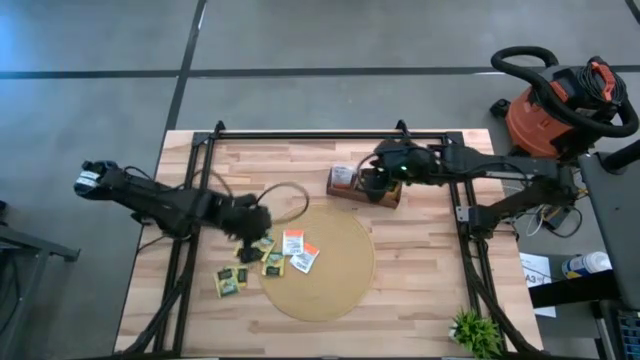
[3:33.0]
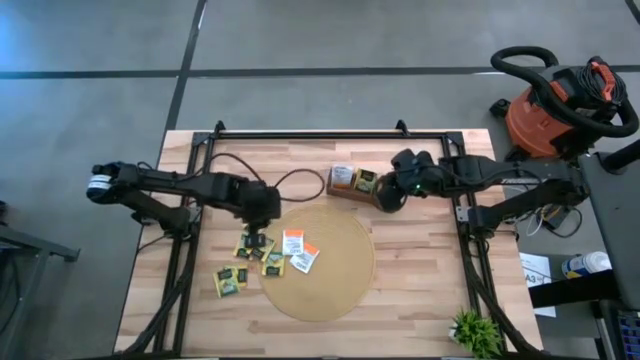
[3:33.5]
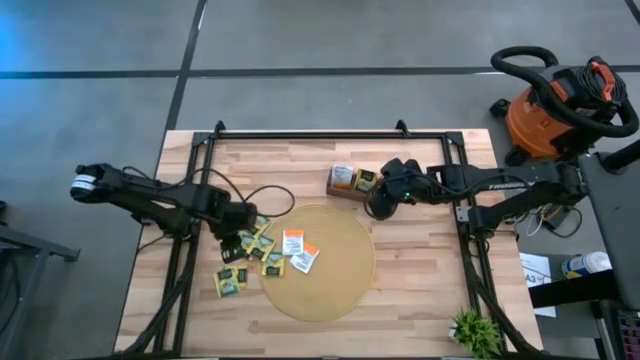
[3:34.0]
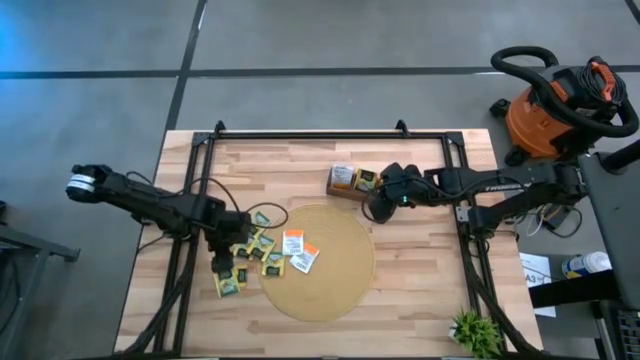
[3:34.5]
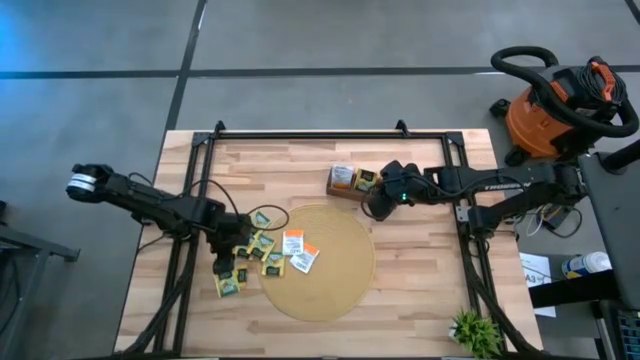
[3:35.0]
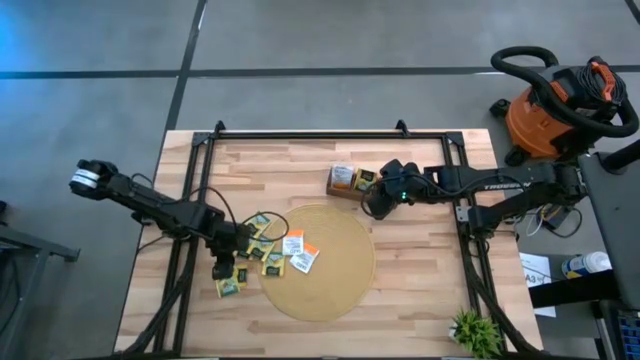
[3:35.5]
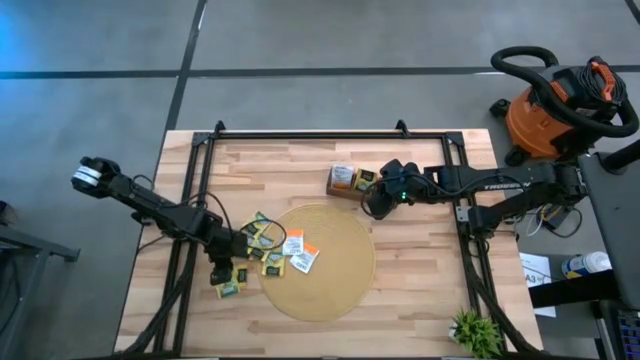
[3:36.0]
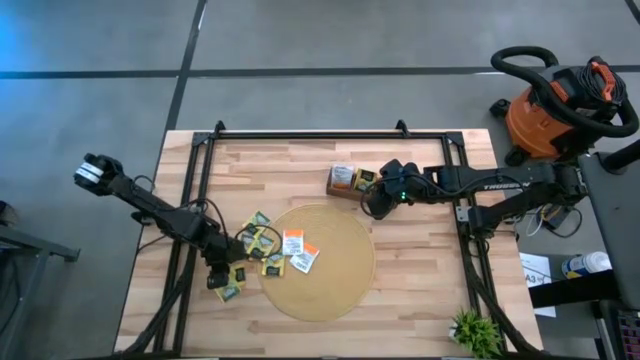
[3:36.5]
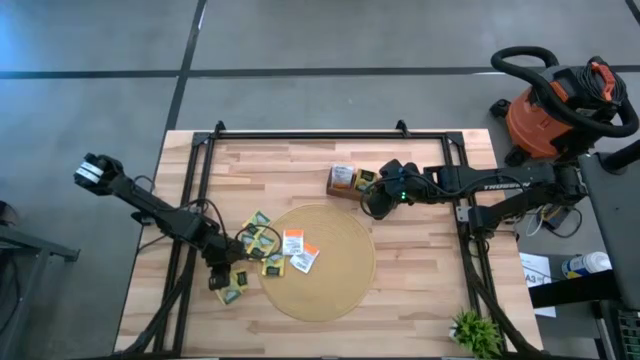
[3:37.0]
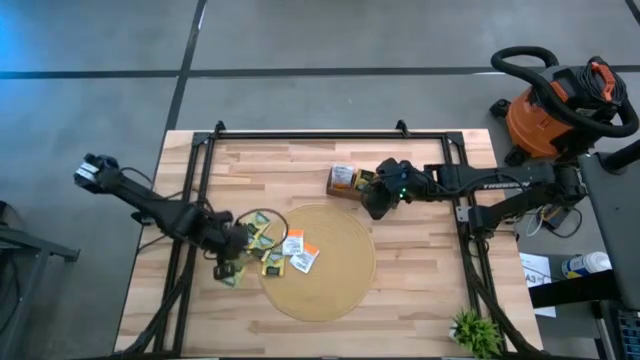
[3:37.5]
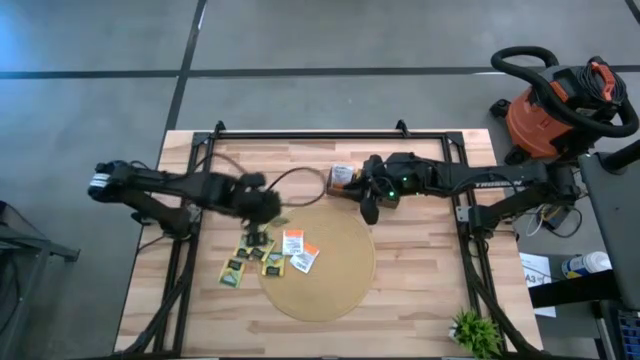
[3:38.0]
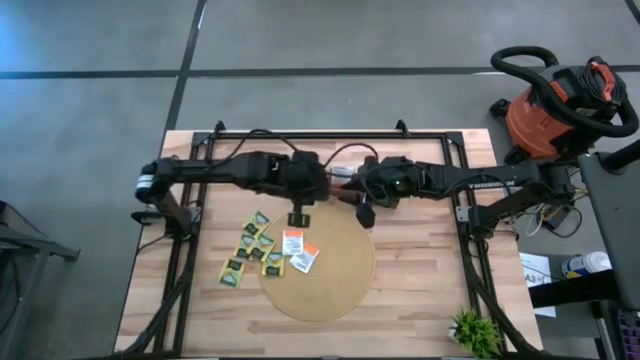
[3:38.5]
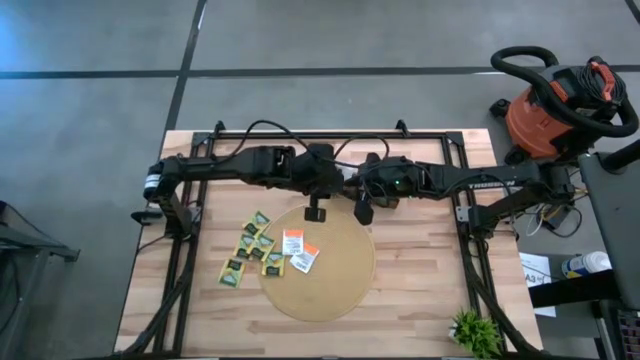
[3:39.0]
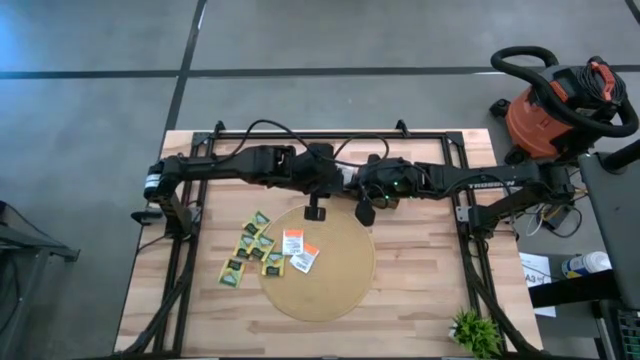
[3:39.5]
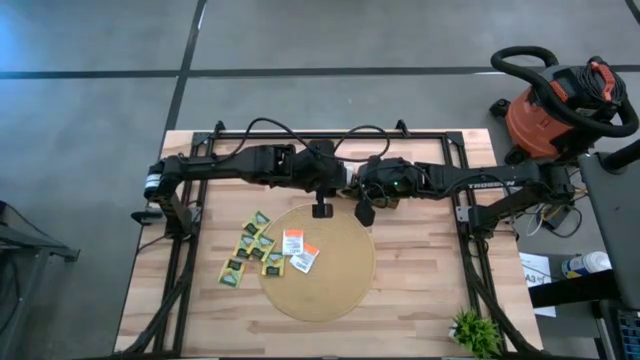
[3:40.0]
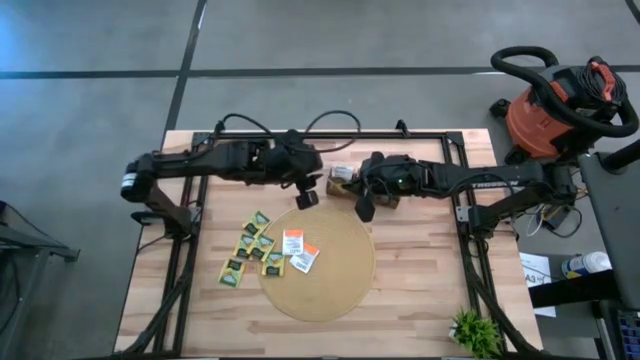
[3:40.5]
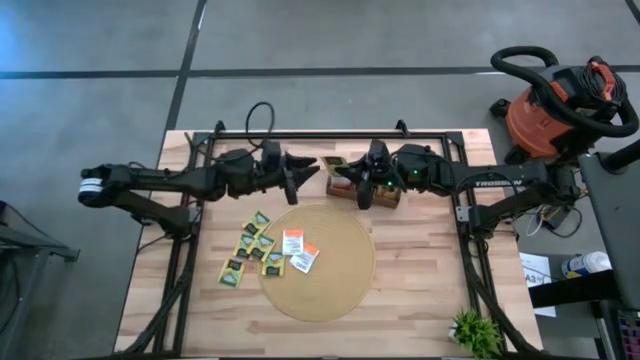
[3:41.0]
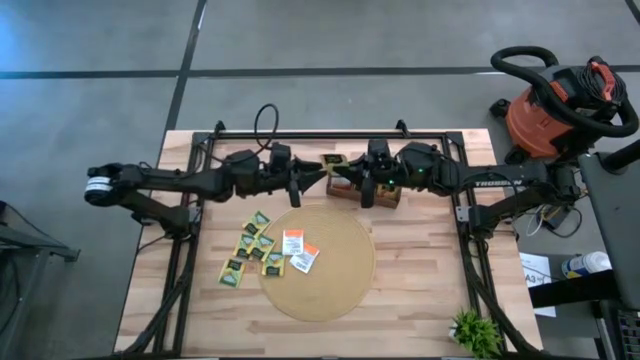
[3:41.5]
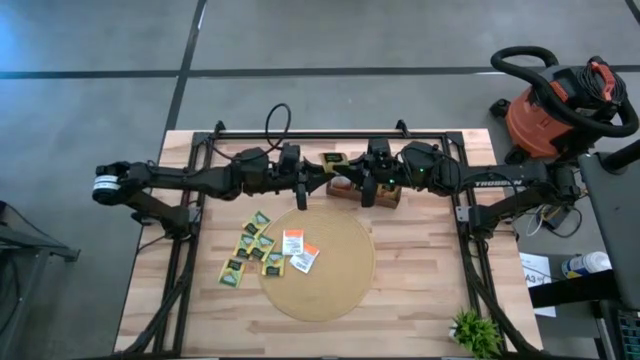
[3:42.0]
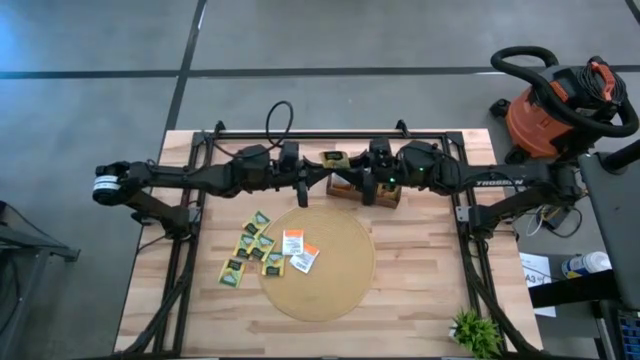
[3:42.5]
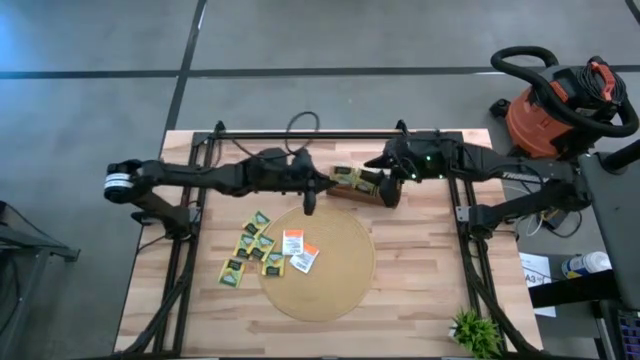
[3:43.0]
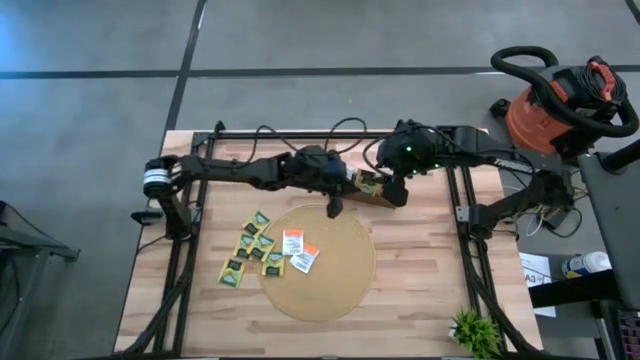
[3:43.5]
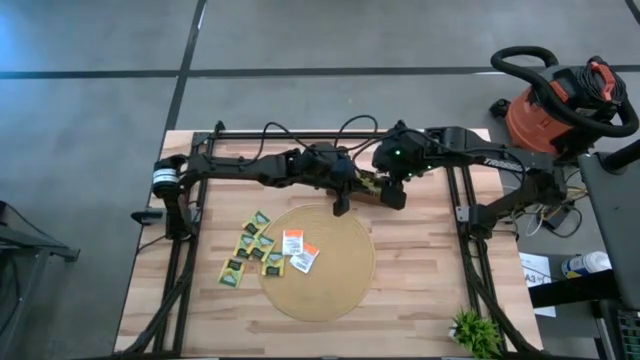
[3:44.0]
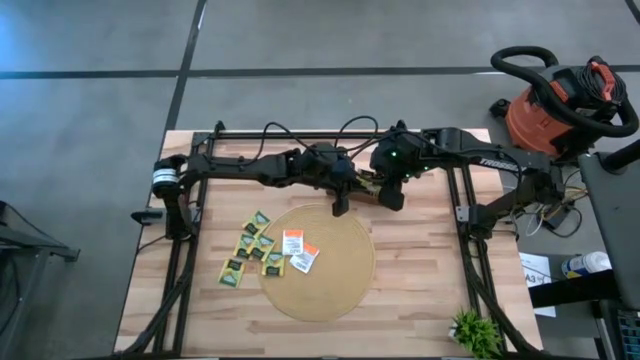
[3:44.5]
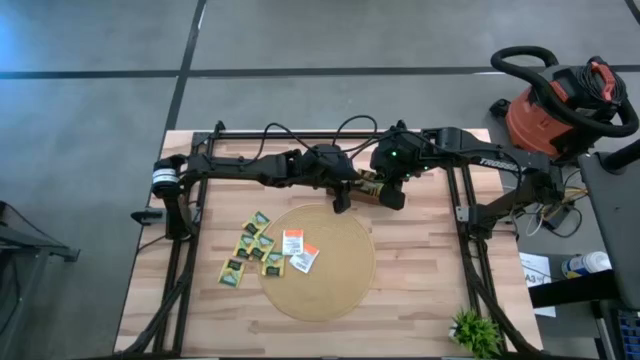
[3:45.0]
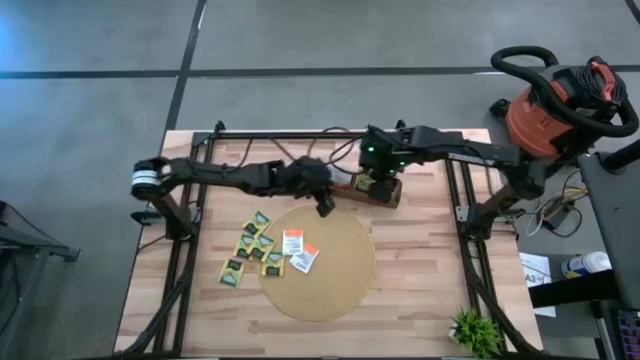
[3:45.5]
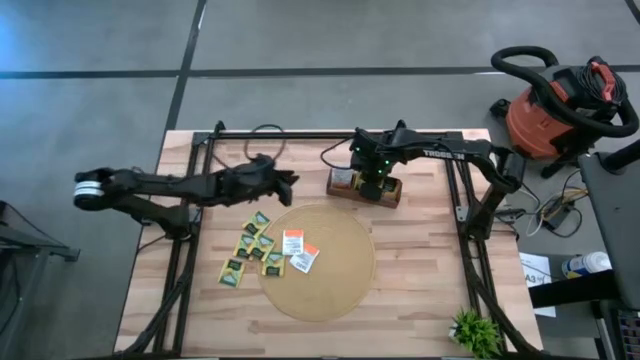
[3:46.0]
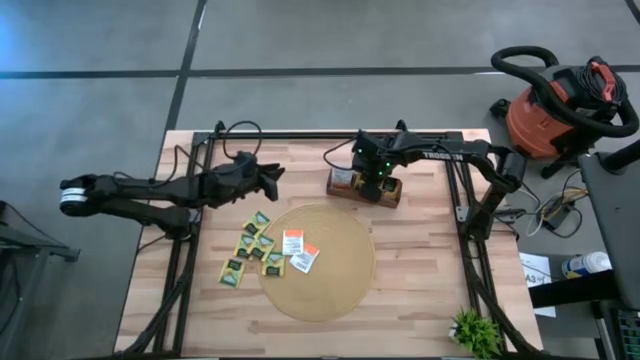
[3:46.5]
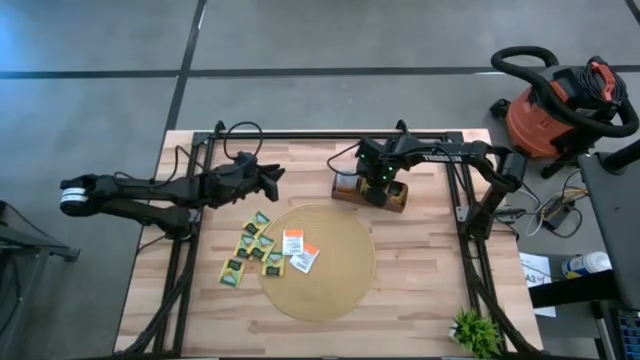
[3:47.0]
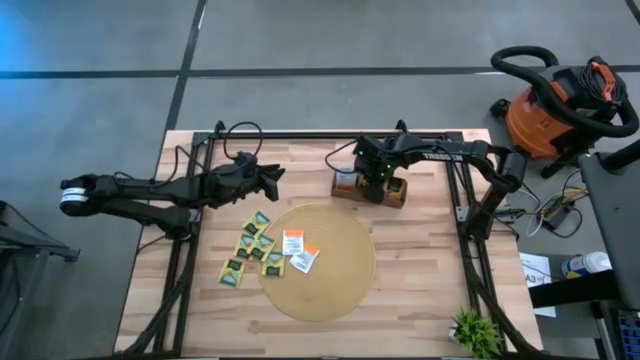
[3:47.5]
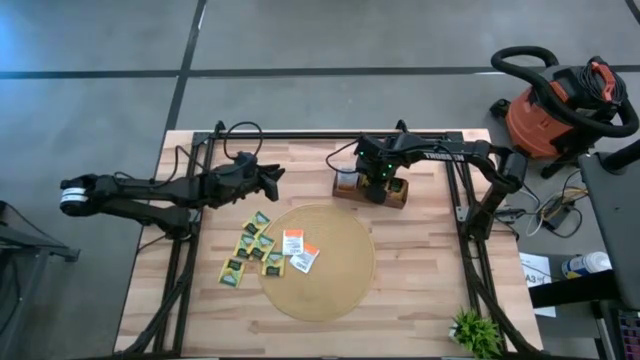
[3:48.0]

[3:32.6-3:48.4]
Task: Pick & Place Tea
Put the lemon tea bag into the middle section of the wooden organizer
